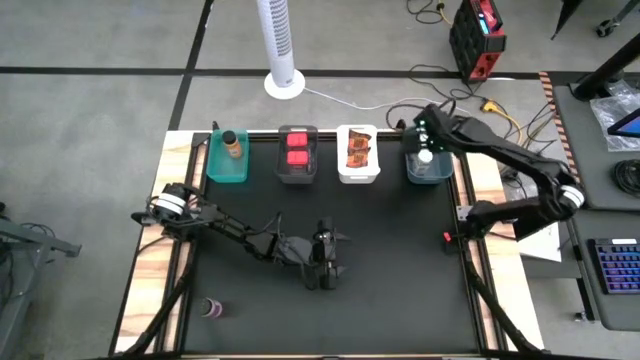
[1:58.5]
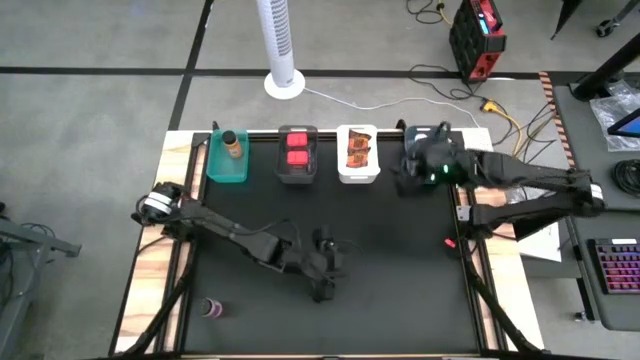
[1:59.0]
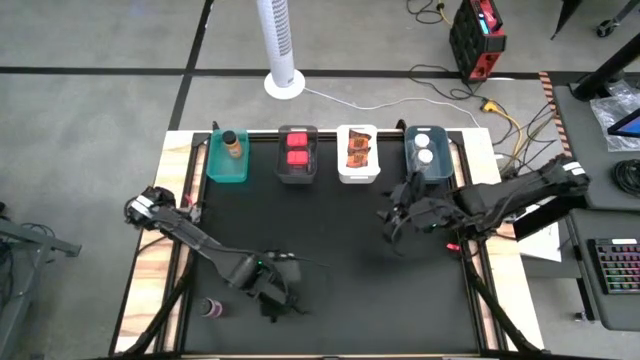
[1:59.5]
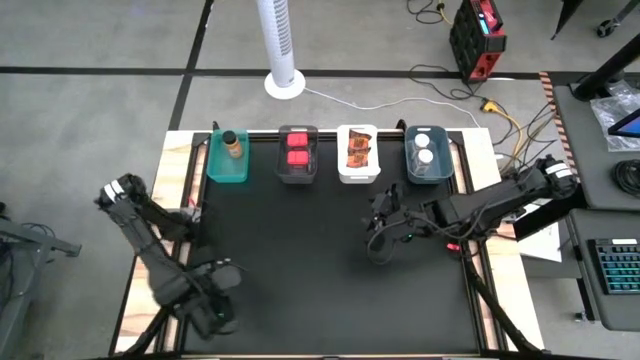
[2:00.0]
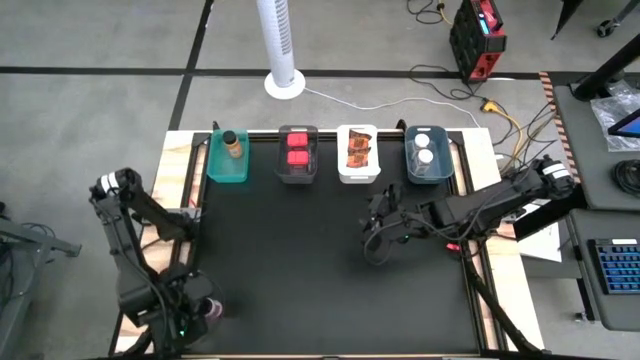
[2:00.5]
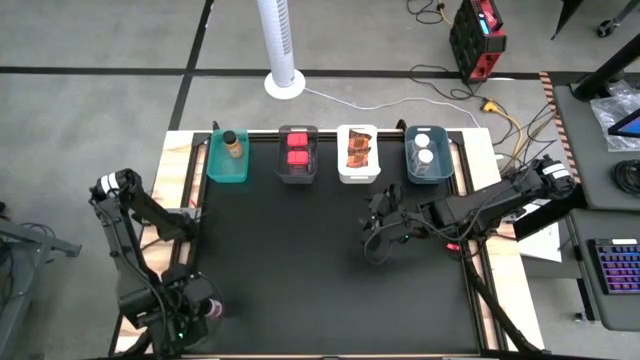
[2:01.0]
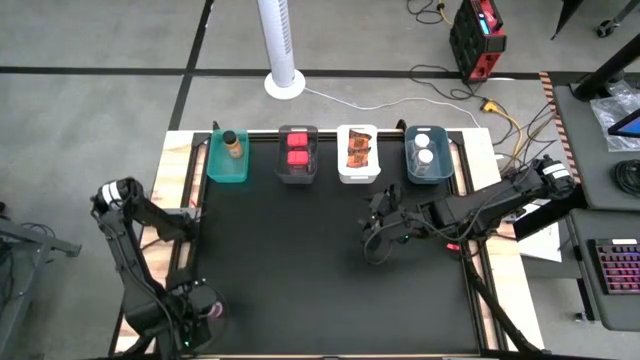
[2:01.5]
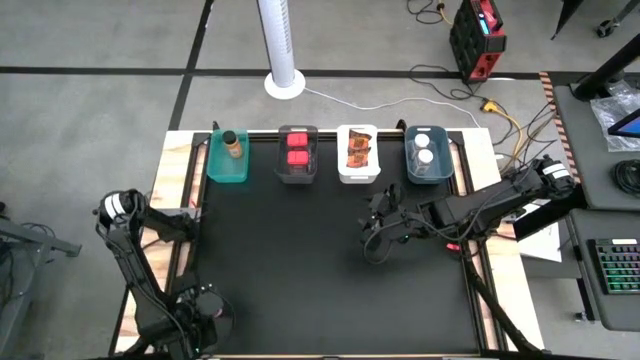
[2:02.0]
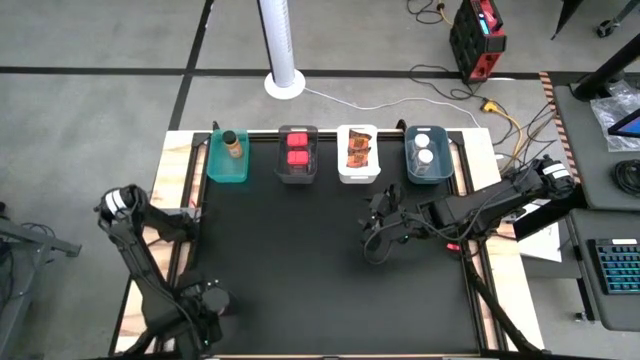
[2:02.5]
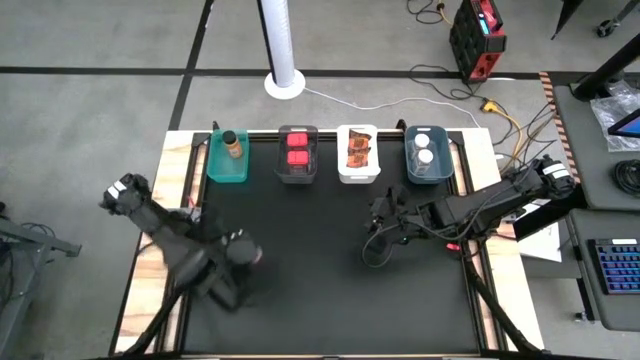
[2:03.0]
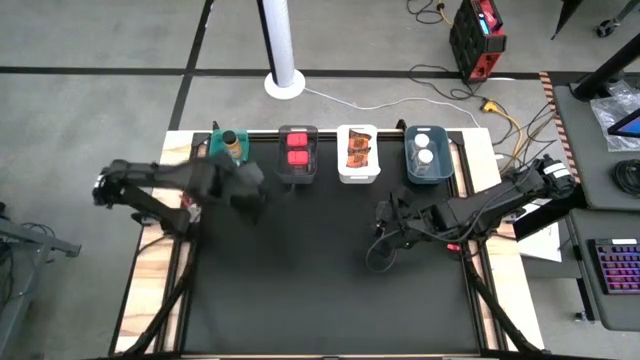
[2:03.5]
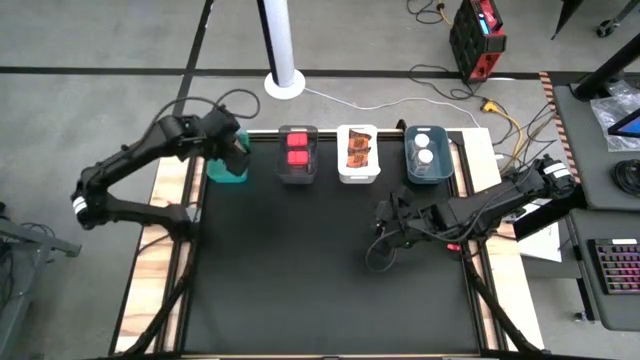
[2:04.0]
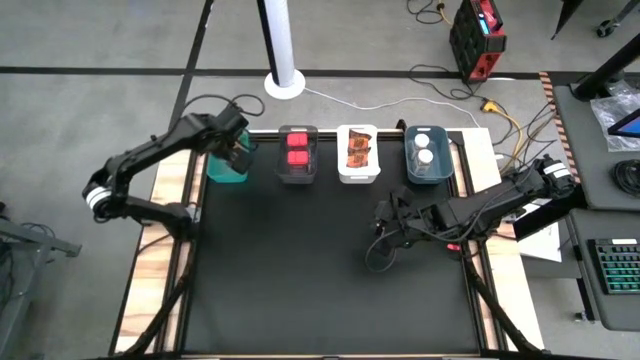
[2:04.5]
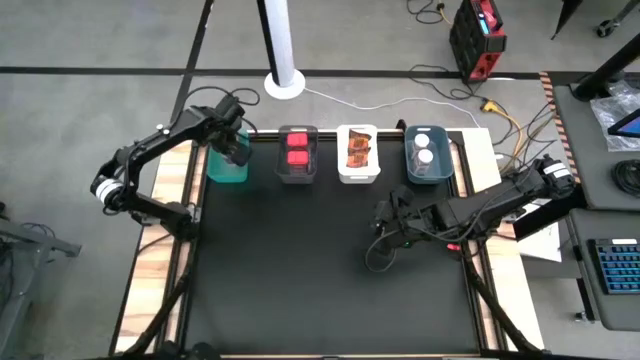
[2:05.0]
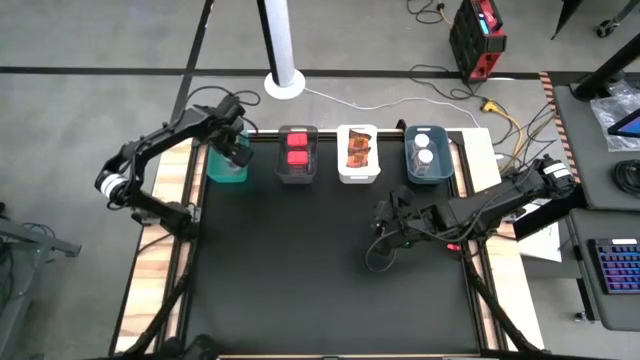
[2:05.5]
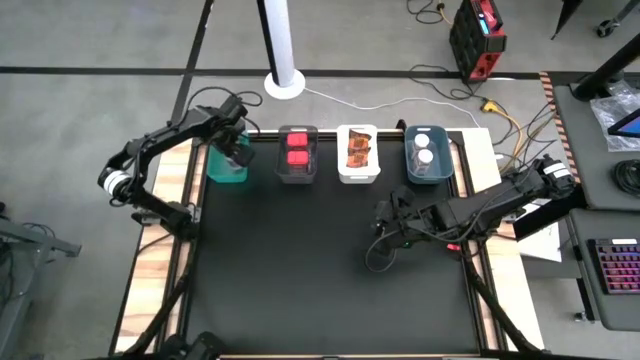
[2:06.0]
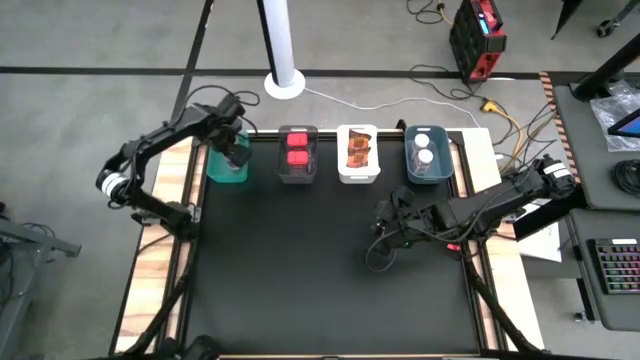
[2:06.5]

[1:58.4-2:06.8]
Task: Sort spices by type
Put the black seasoning bottle into the green bin

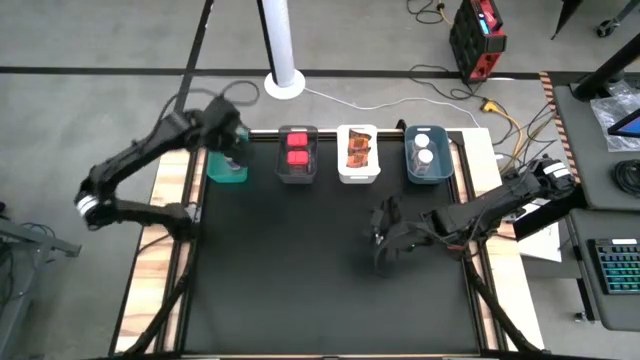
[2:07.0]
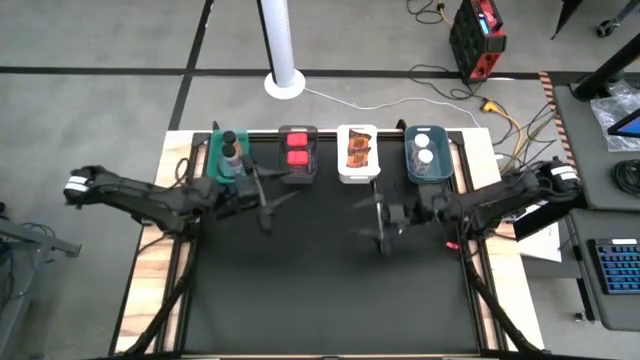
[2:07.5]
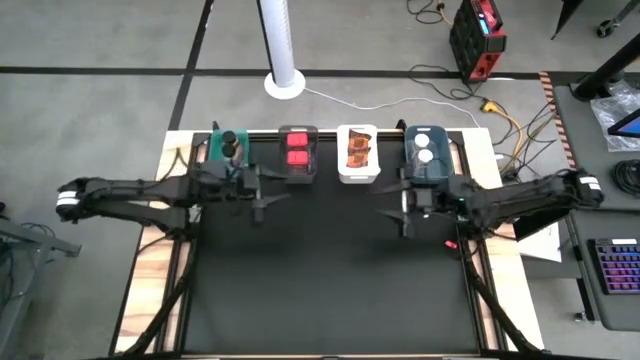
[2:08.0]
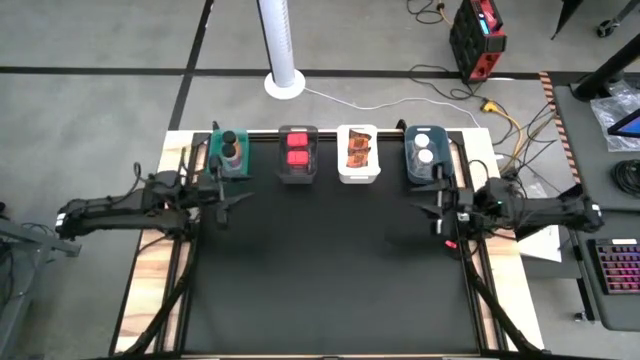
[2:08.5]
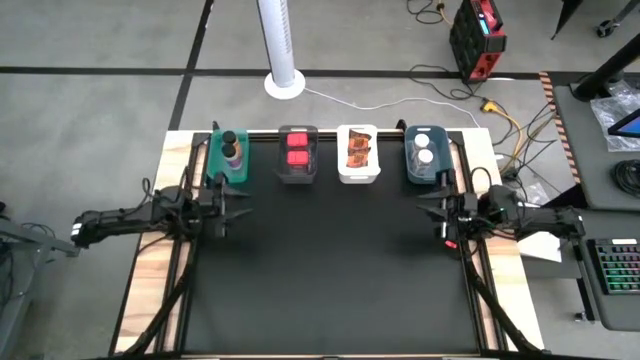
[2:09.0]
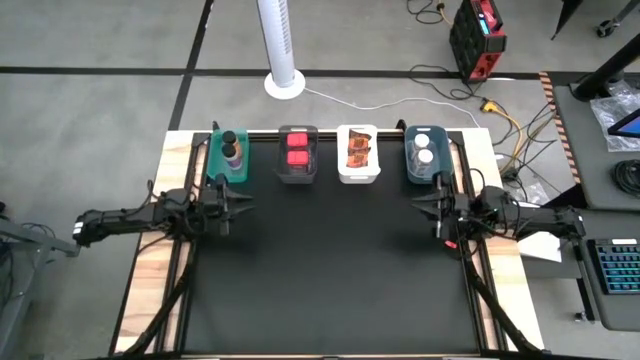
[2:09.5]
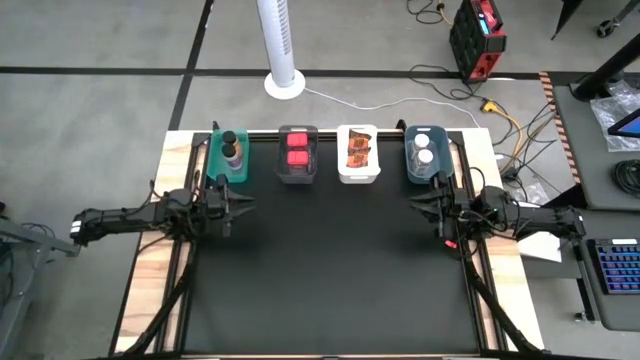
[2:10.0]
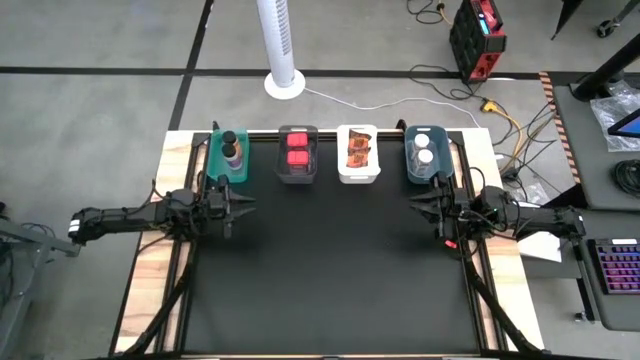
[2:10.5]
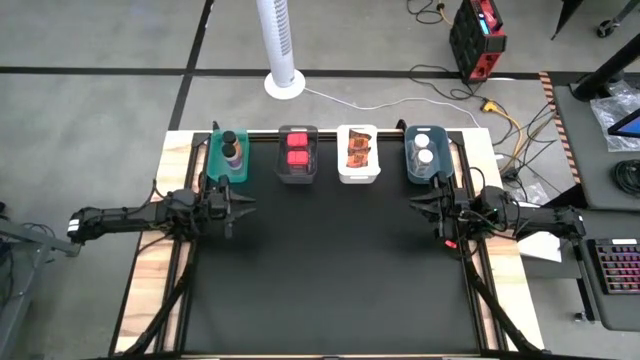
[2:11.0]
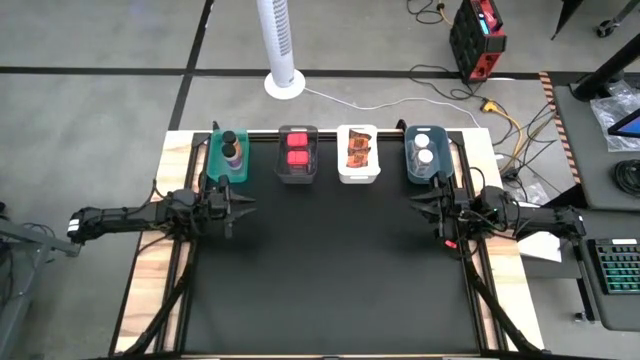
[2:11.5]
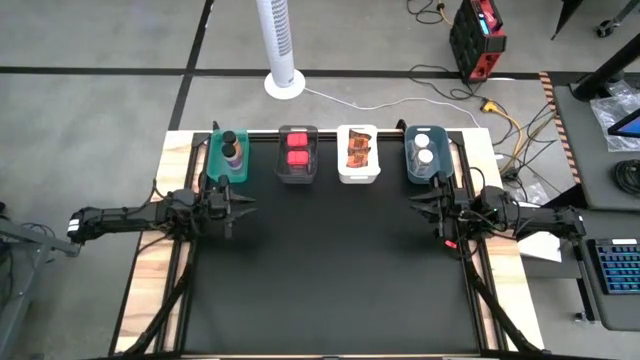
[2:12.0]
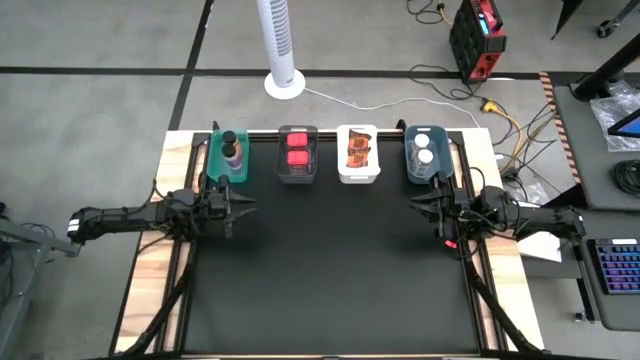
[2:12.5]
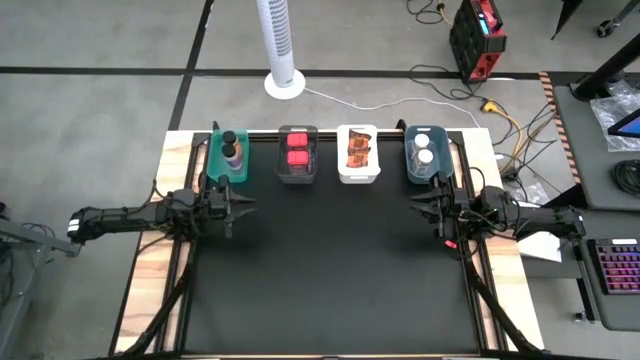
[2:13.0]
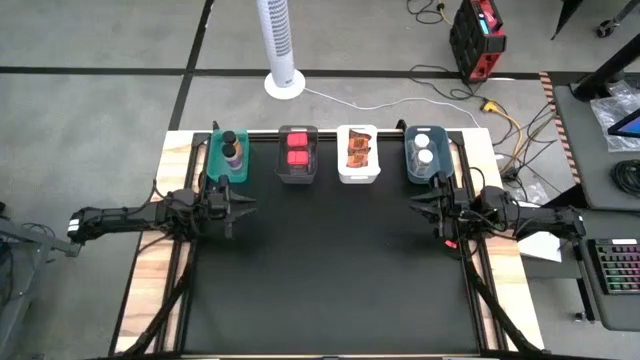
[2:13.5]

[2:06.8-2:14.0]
Return to Home position

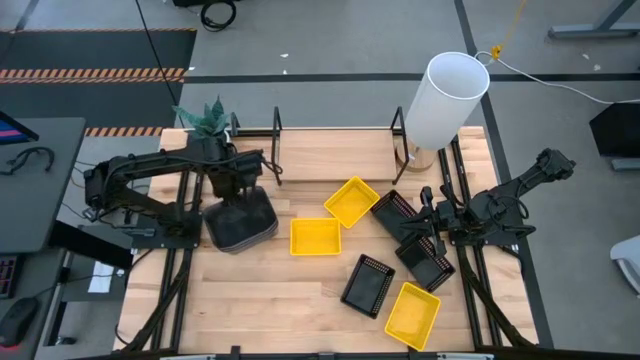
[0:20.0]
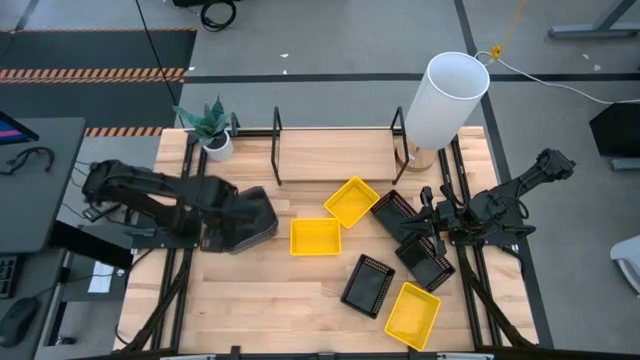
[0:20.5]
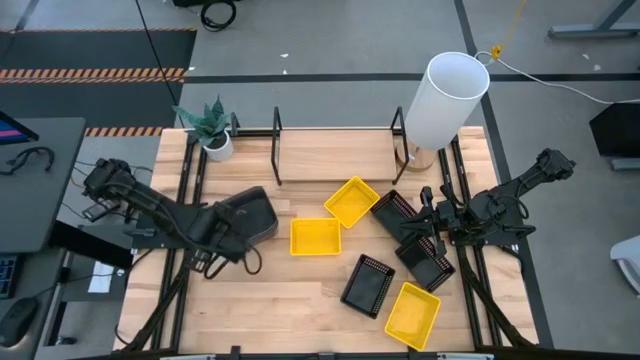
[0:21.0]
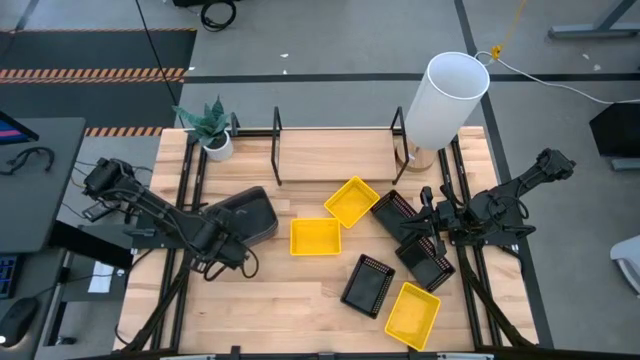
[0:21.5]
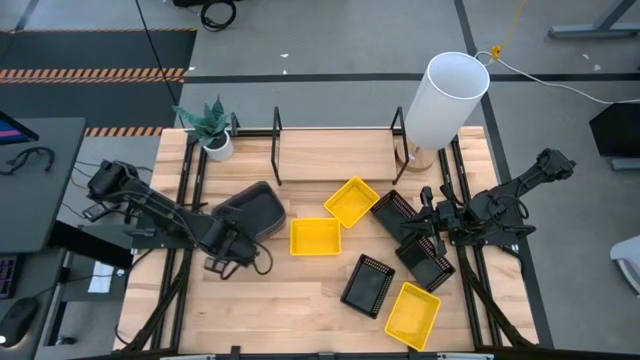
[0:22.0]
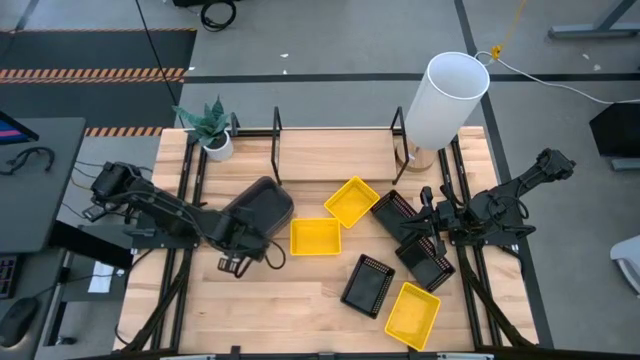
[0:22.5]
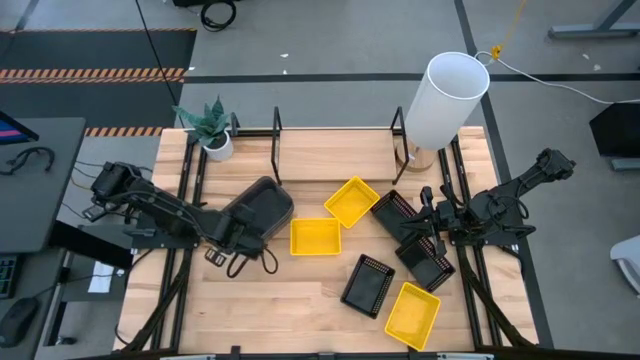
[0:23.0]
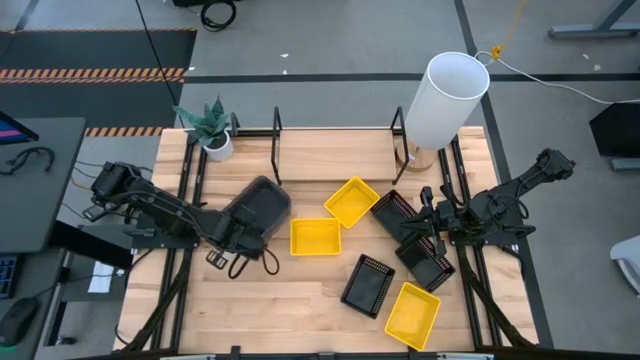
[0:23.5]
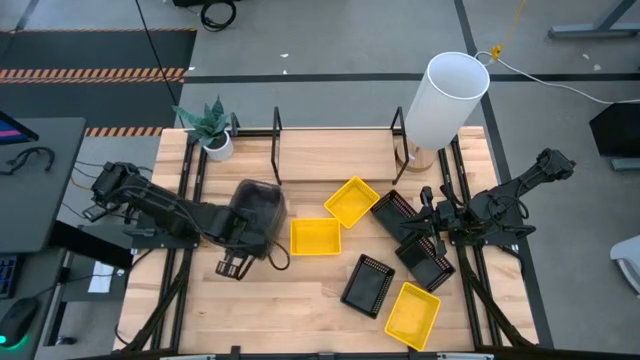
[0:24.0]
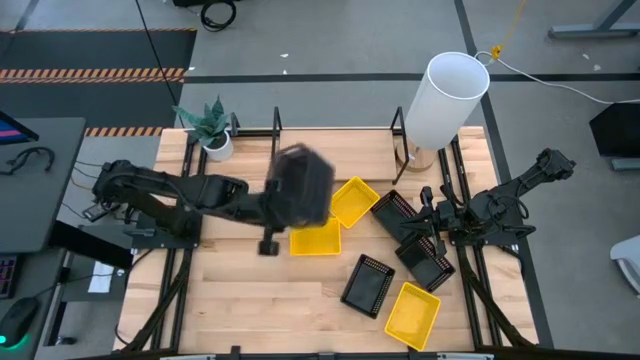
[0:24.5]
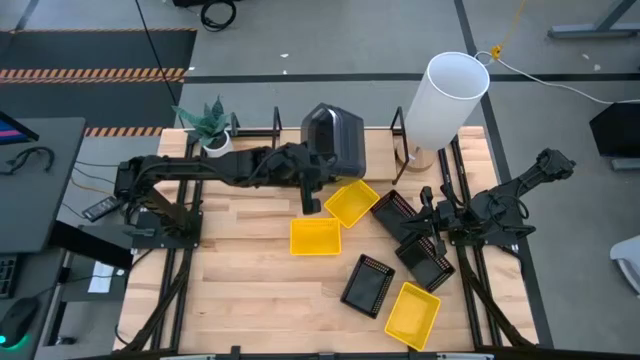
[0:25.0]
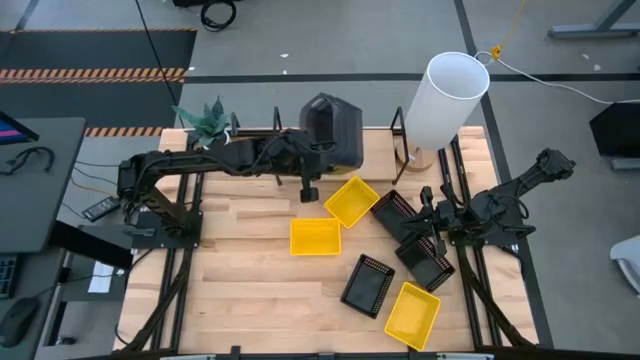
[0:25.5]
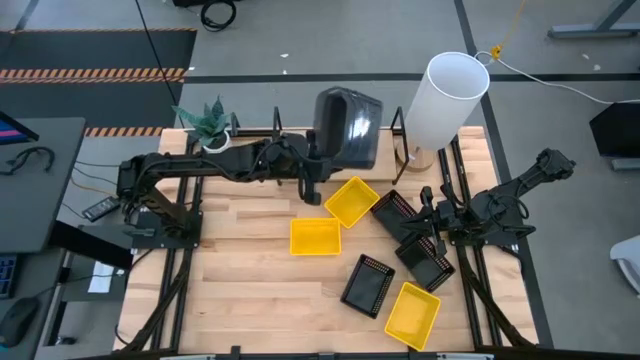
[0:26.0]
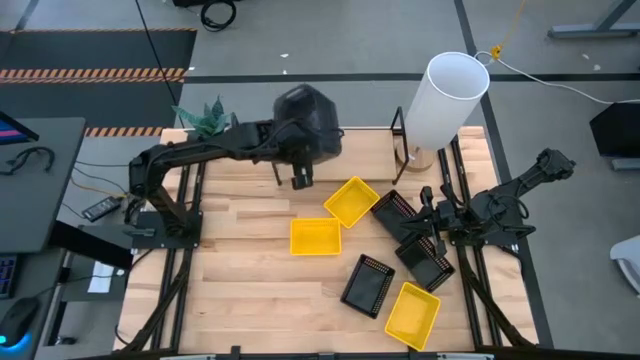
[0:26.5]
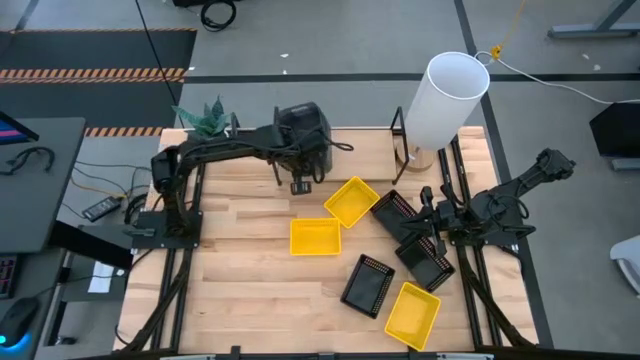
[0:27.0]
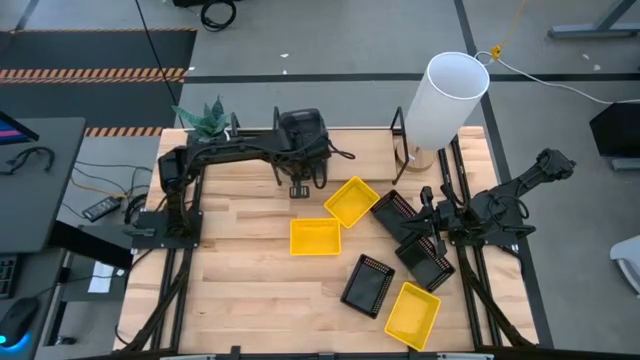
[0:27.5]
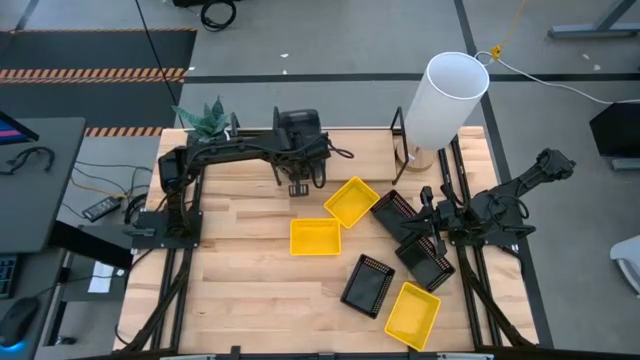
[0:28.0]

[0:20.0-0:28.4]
Task: Stack baskets on shelf by color
Put the stacked transparent black bins on the shelf
